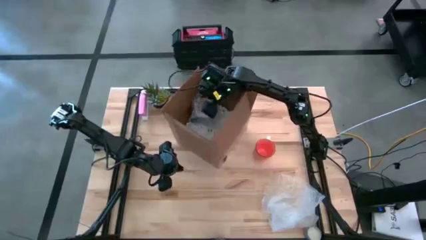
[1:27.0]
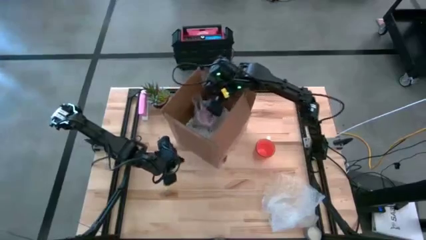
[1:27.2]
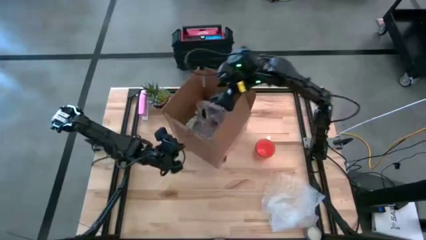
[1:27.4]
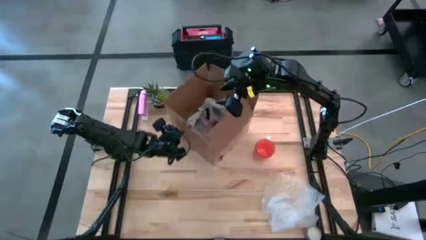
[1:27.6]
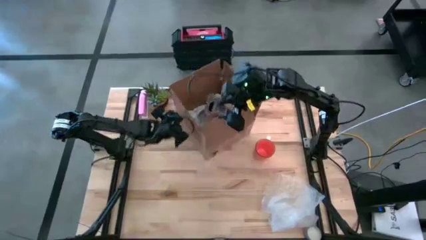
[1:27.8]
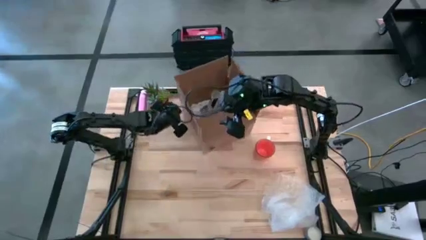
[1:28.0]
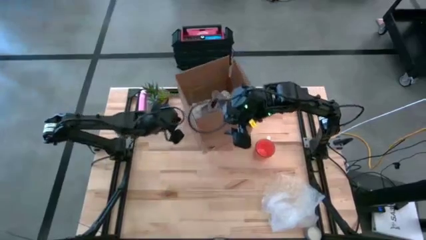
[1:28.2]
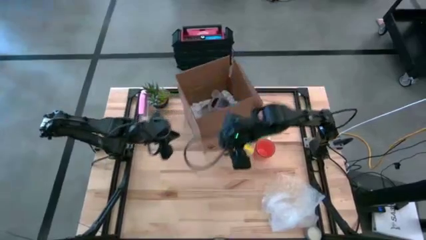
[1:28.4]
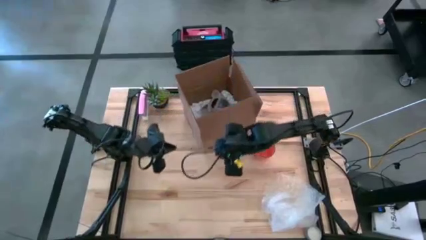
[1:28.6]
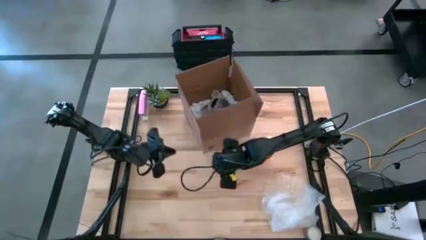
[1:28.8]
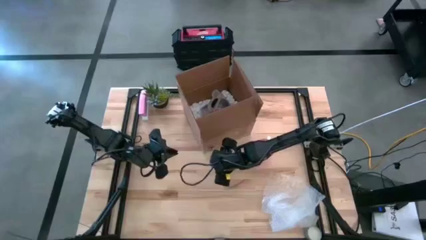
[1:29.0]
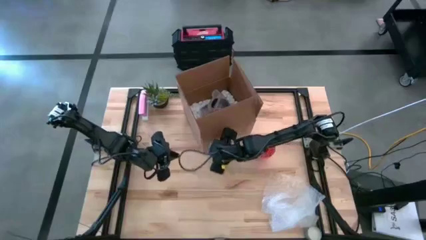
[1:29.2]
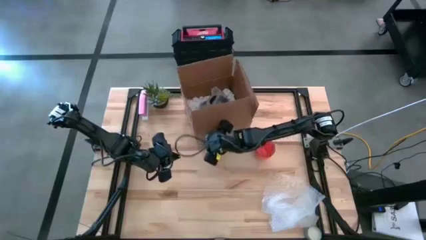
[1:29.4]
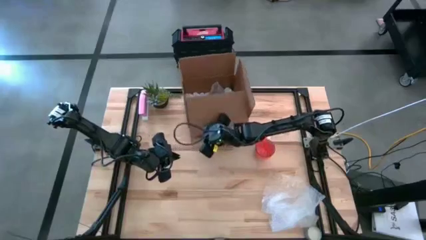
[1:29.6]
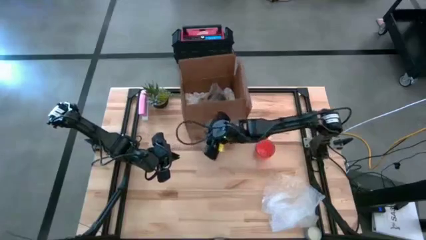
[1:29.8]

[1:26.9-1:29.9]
Task: wrap mug
Adjust the cardboard box on the table

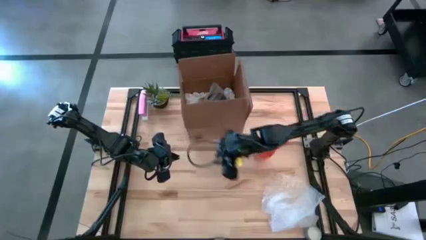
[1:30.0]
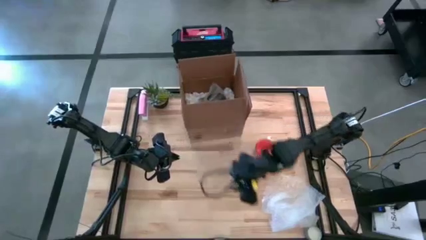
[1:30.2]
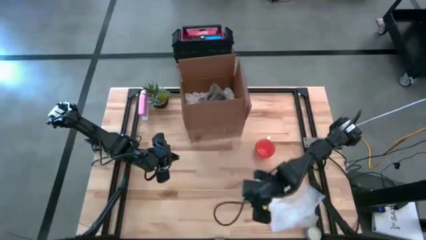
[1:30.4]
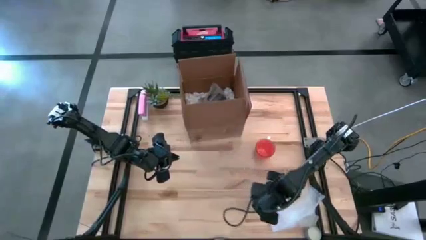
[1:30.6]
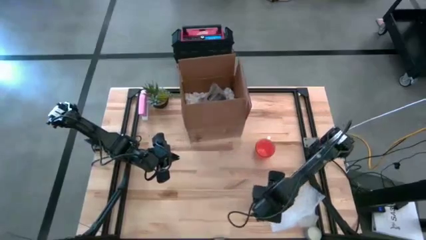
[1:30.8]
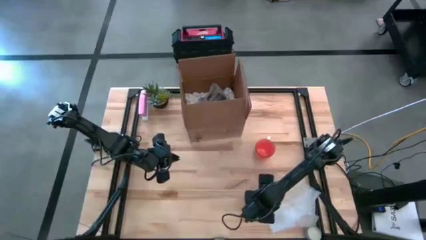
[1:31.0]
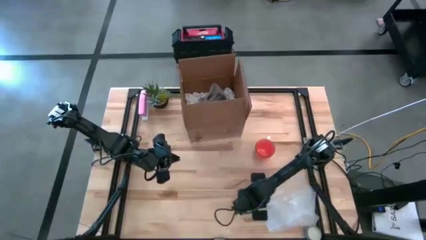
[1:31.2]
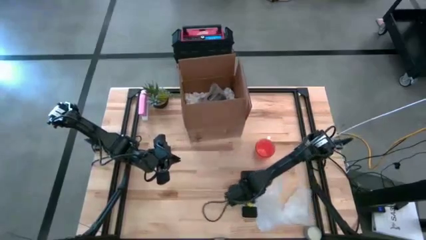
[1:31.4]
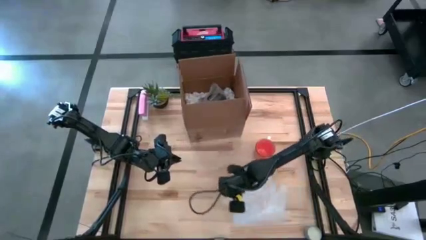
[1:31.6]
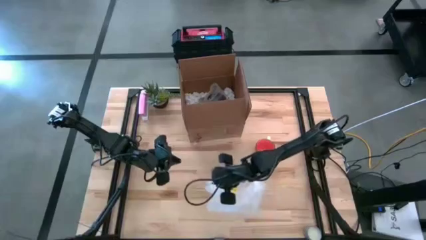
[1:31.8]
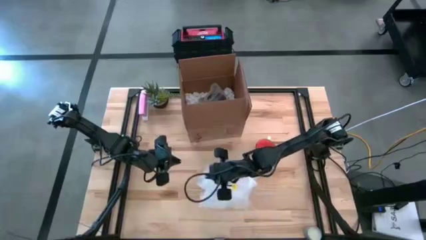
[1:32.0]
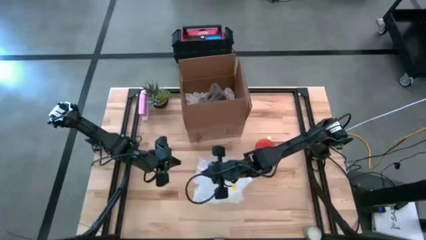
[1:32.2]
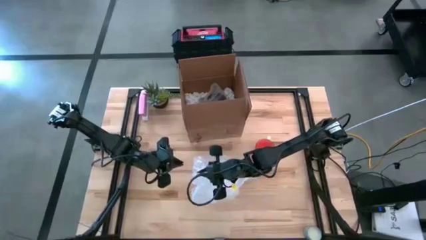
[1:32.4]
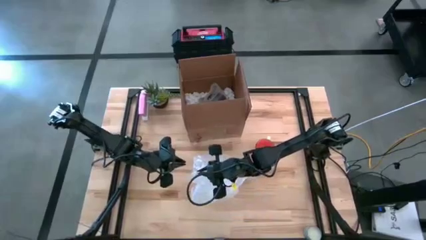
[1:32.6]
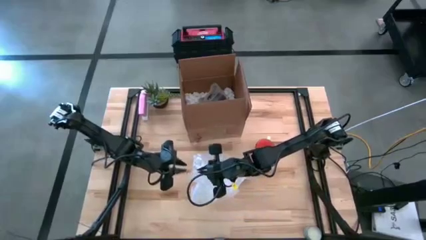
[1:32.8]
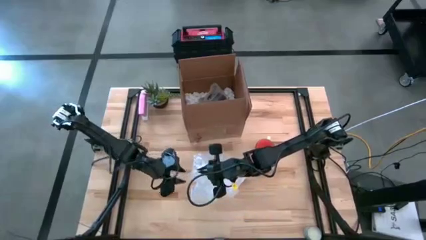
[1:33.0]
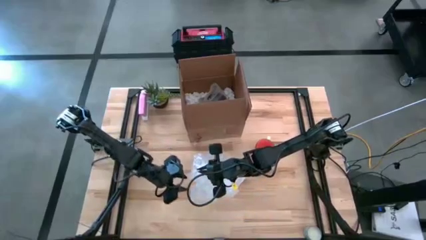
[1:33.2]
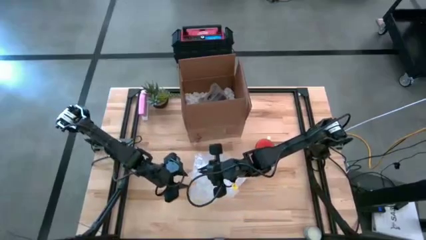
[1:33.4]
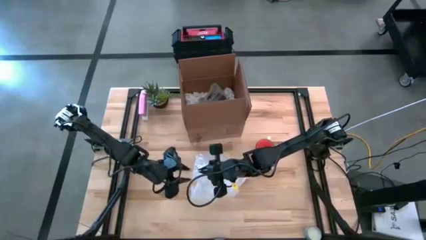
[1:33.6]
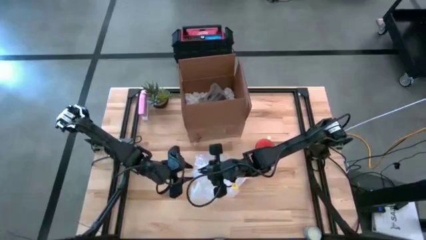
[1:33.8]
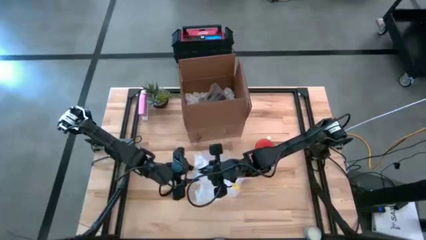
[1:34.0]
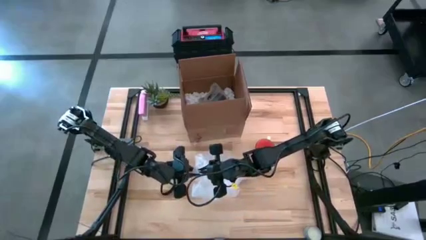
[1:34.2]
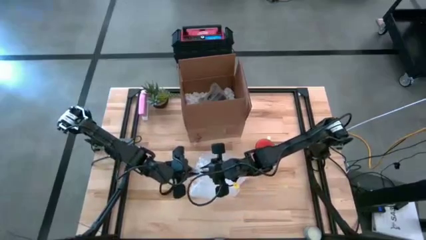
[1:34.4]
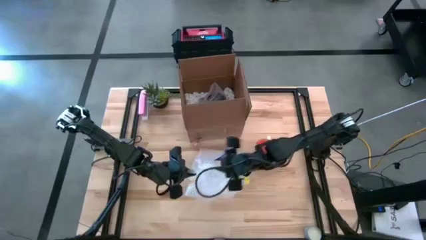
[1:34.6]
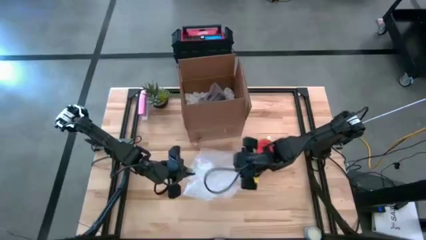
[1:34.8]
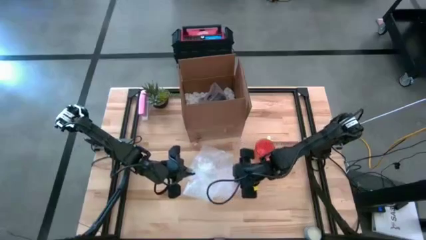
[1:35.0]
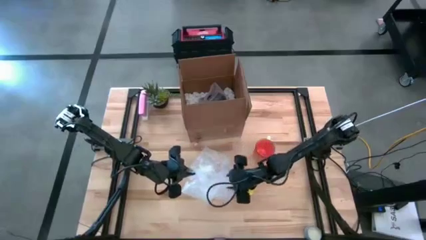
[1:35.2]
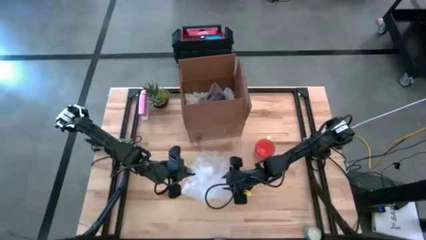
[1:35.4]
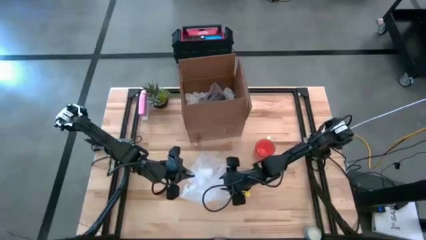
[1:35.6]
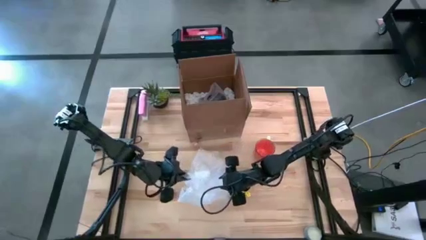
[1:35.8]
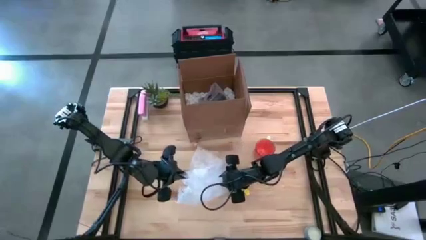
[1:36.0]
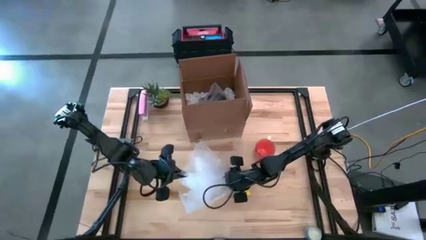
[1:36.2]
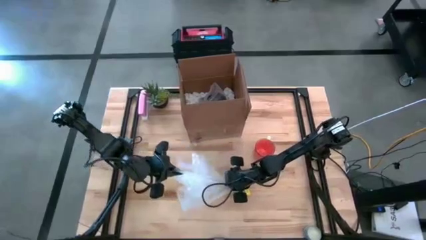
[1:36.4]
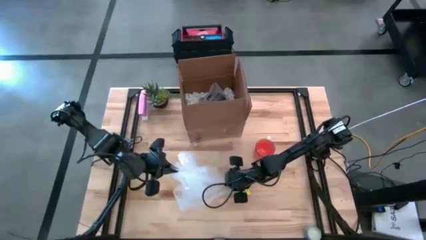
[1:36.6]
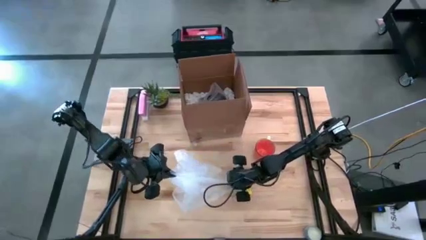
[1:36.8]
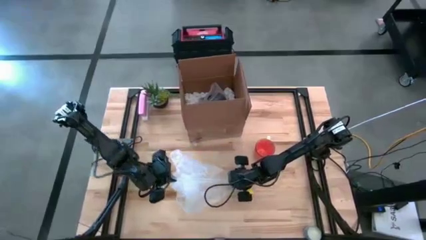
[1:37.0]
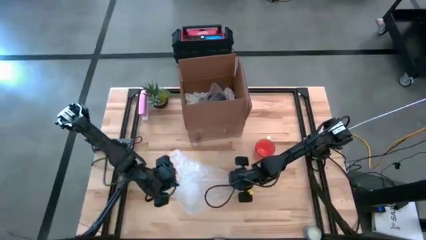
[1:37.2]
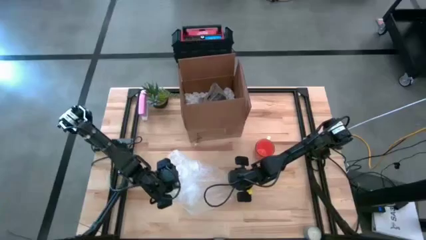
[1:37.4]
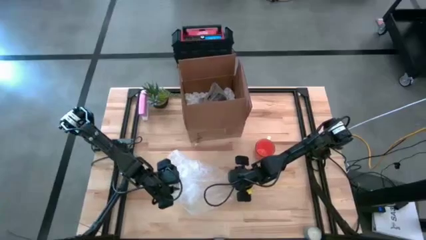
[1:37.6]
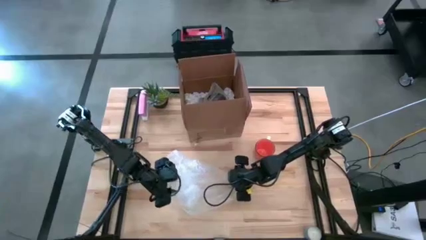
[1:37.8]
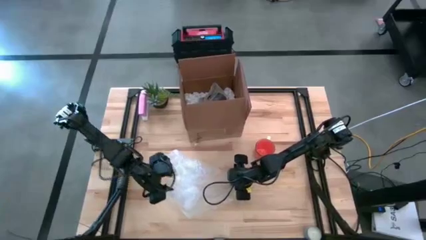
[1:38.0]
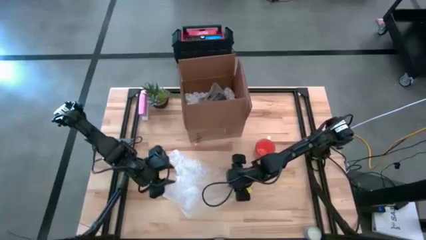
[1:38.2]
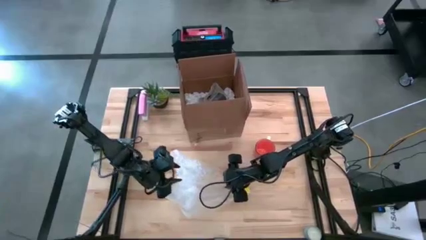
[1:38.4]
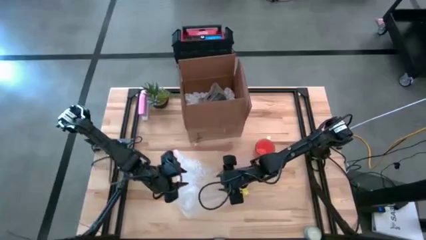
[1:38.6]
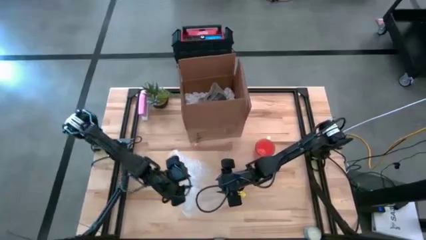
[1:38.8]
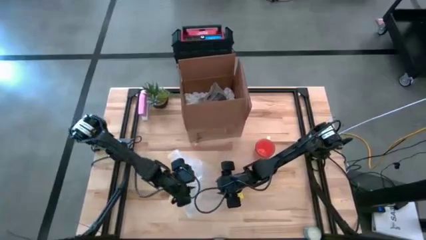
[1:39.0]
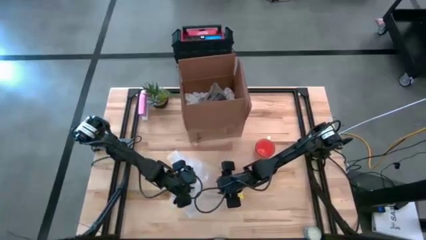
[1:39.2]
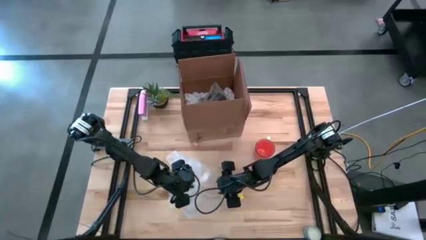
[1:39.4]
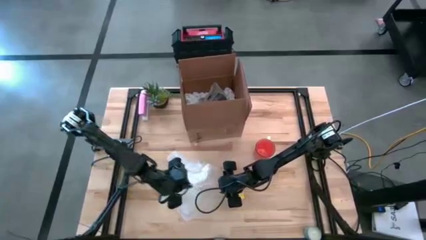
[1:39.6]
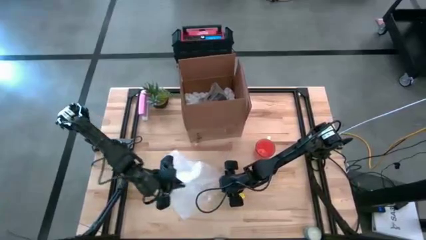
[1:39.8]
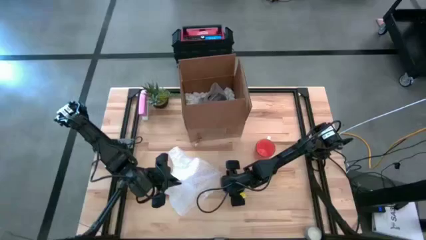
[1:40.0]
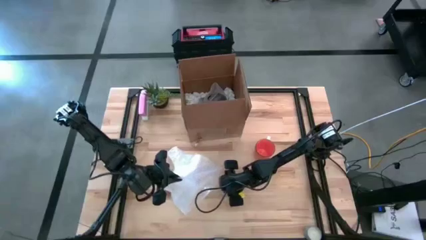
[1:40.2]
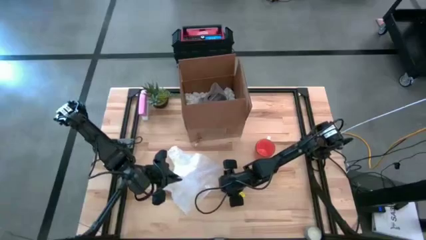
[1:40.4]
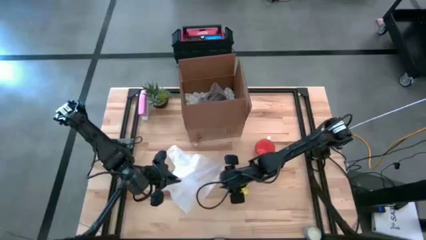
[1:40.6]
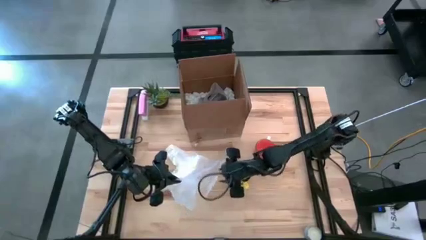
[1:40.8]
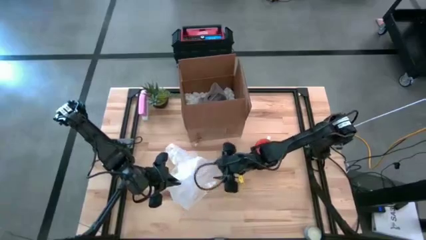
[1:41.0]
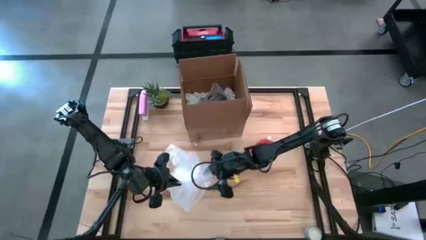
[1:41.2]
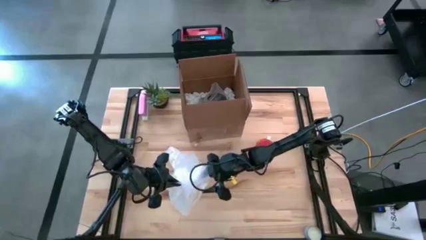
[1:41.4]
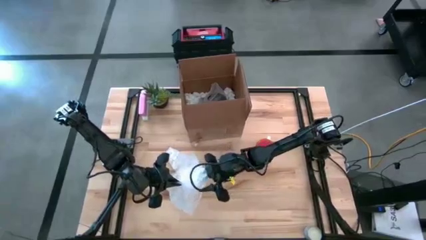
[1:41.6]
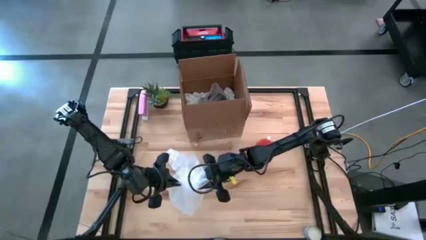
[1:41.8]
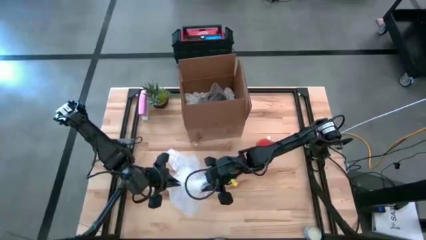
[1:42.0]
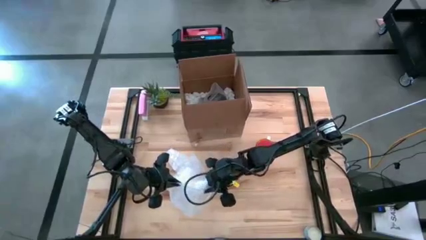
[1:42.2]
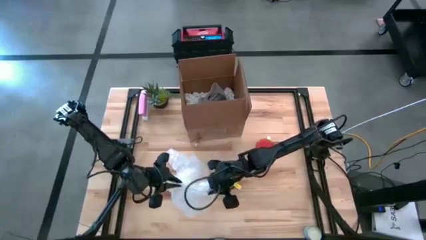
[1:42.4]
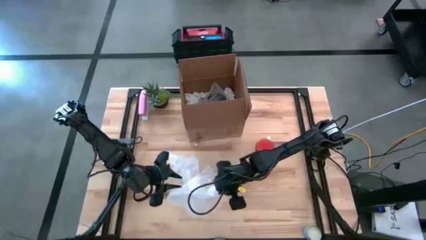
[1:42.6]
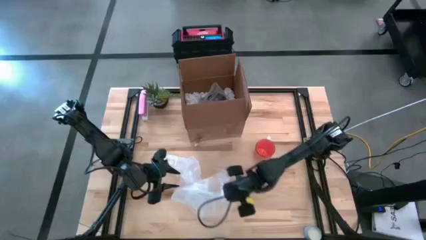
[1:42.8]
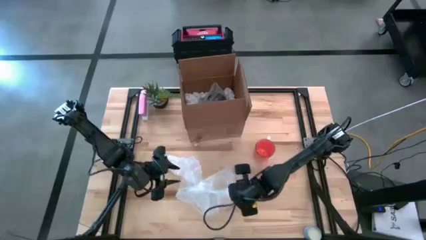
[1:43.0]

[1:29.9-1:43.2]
Prepare the transparent bubble wrap

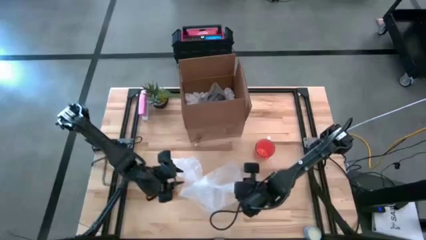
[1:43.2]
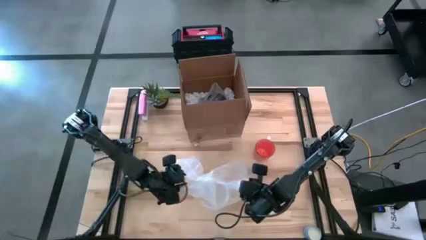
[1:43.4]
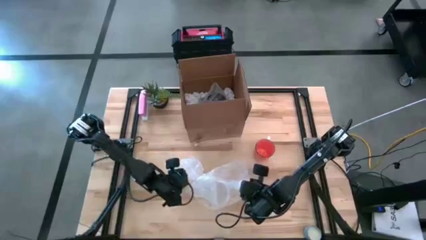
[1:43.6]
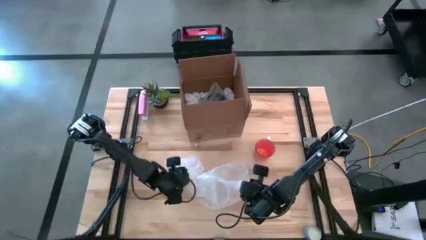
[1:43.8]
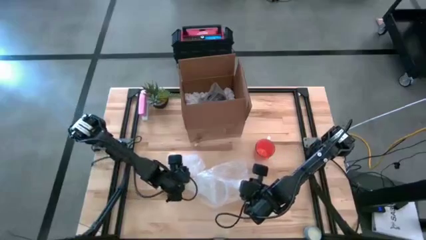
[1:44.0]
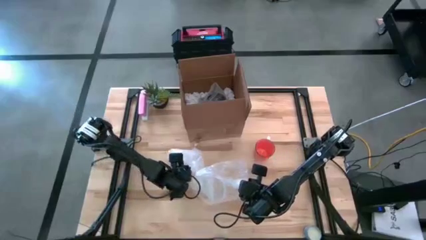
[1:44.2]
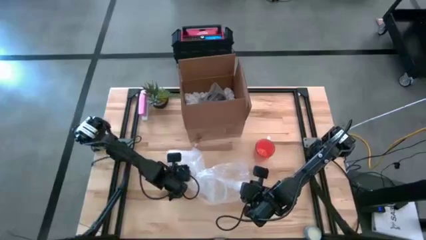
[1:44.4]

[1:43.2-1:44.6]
Prepare the transparent bubble wrap
